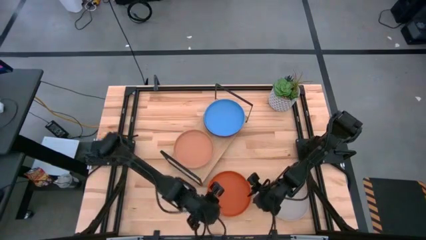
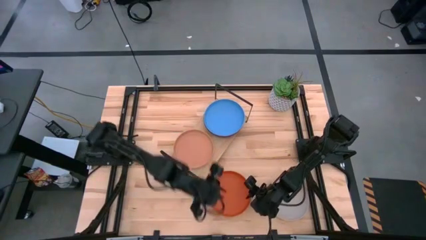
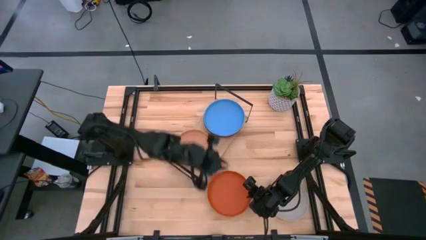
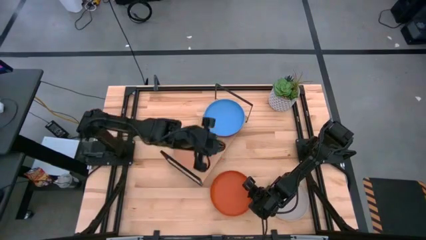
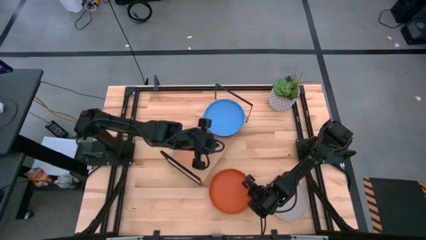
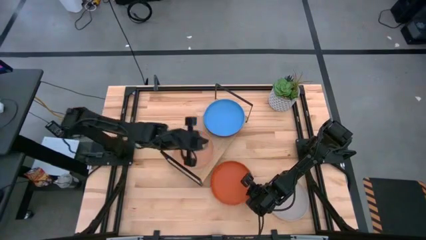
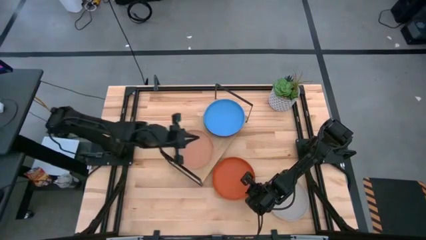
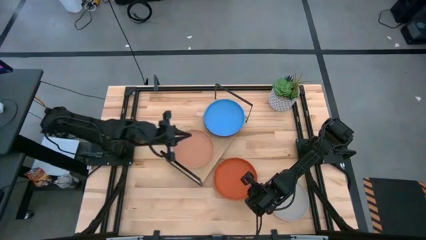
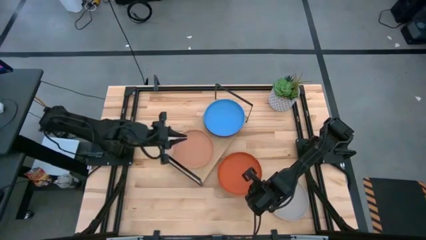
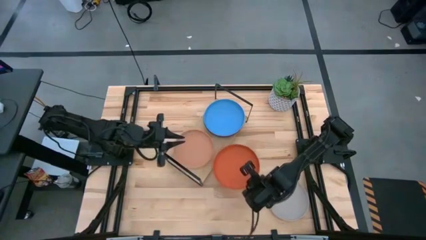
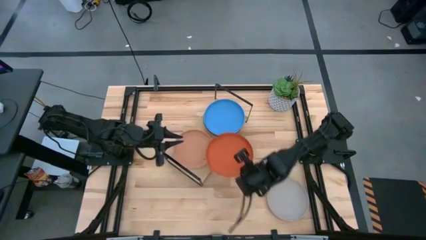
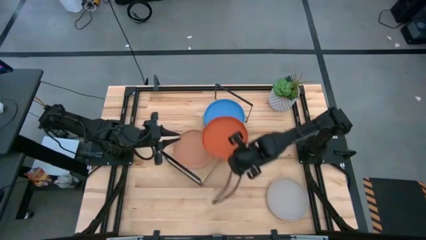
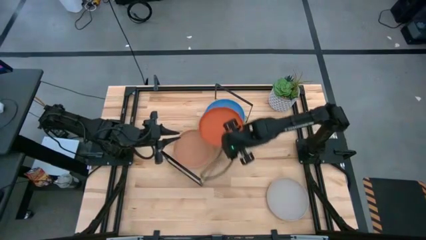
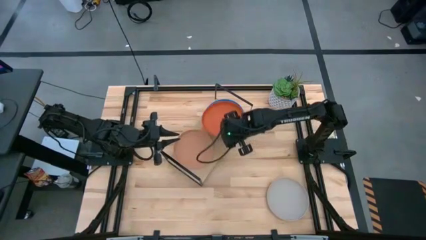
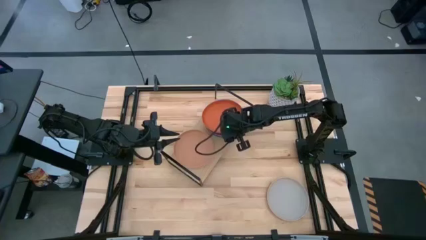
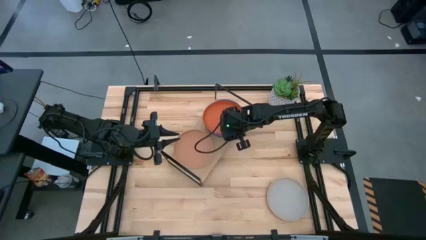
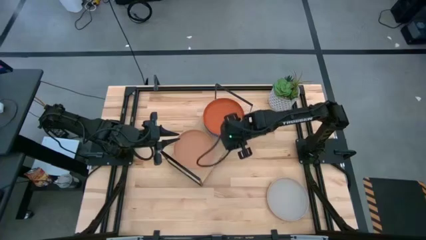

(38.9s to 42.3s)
Task: Place and stack plates onto a shelf
Stack the orange plate on top of the blue plate on the shelf

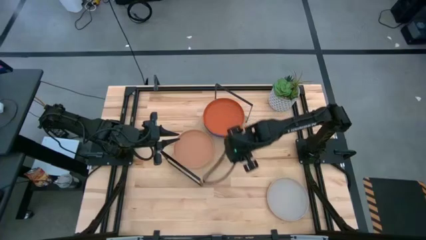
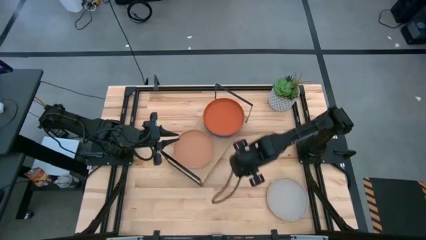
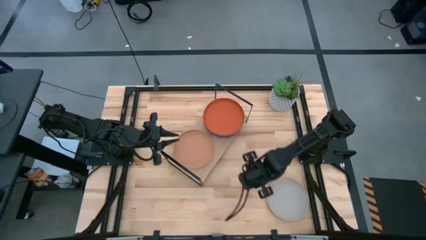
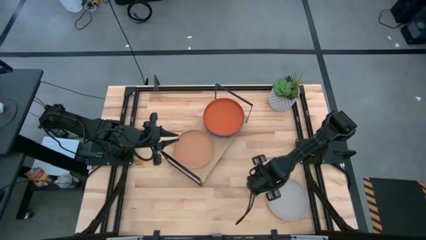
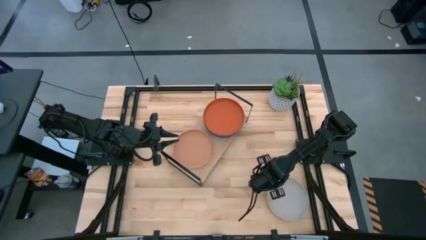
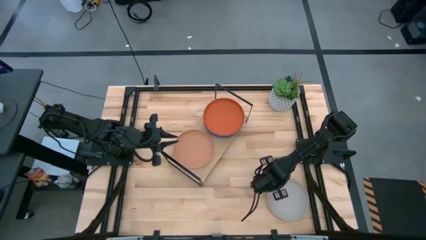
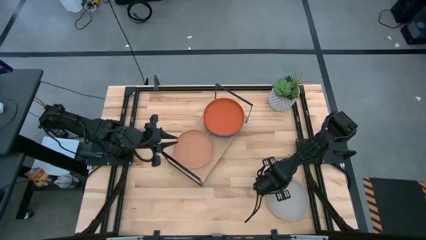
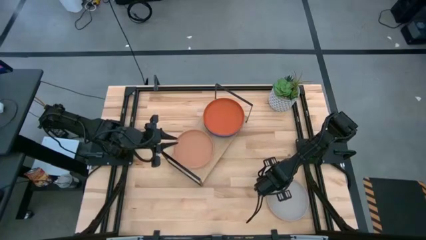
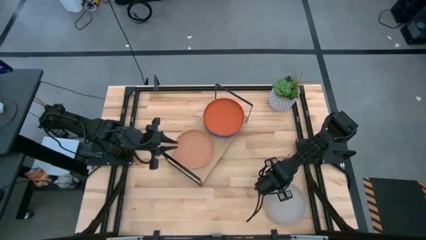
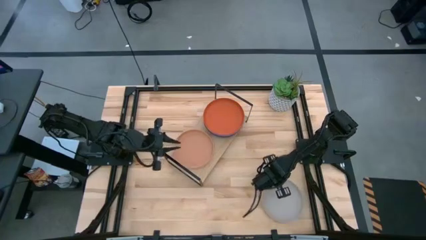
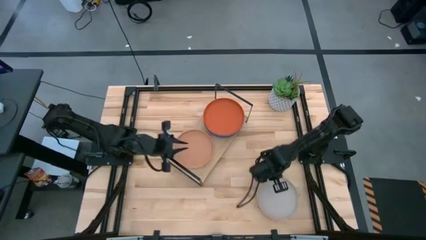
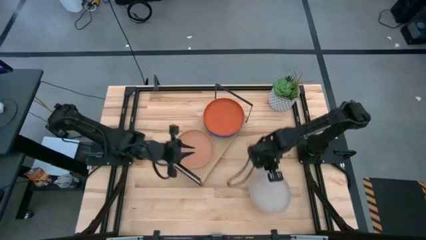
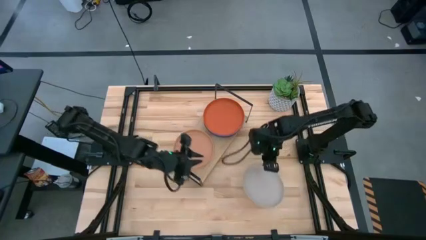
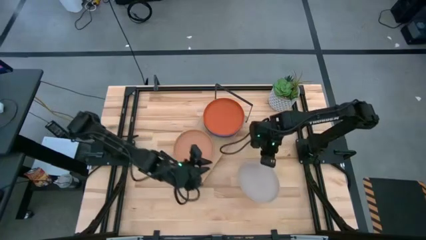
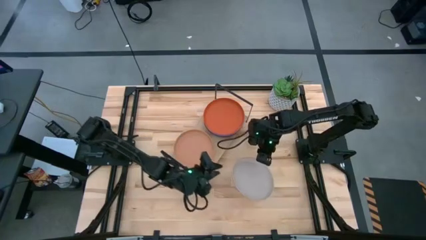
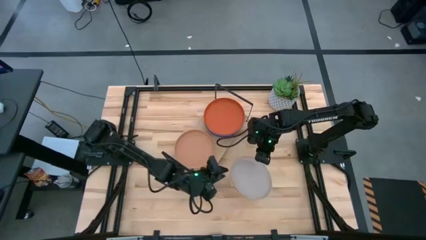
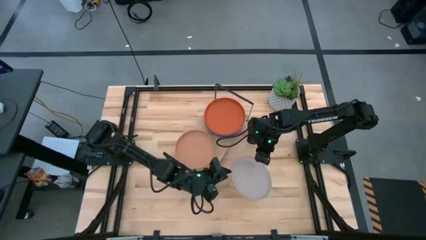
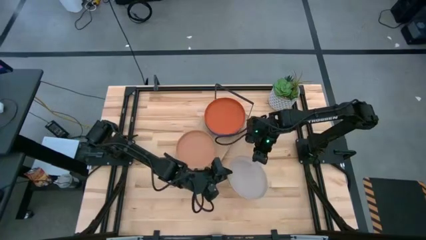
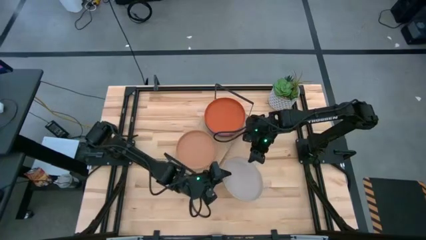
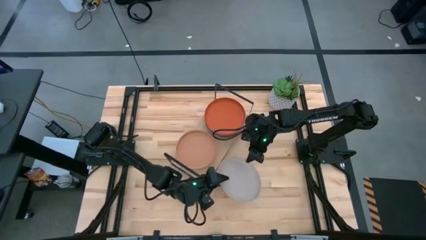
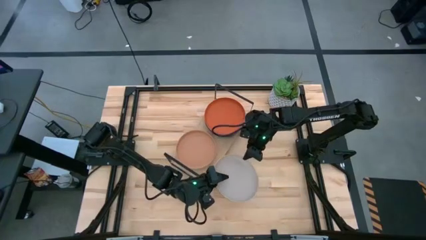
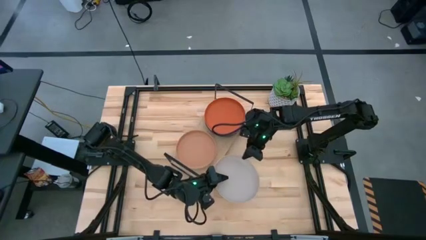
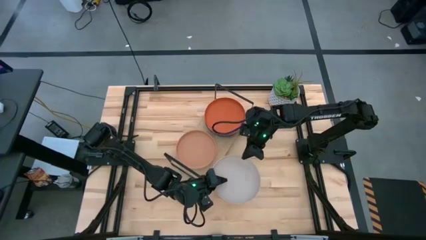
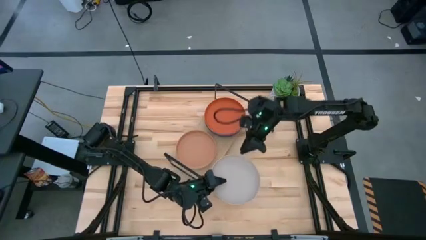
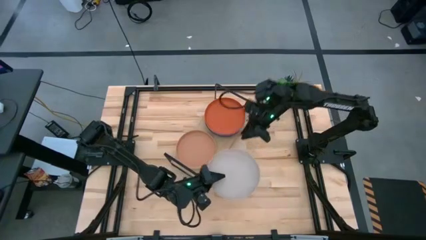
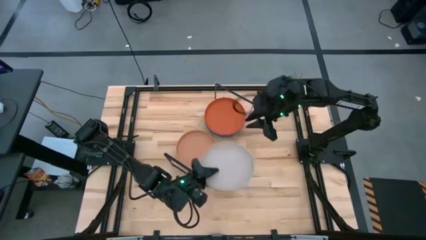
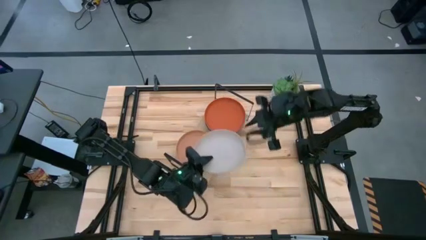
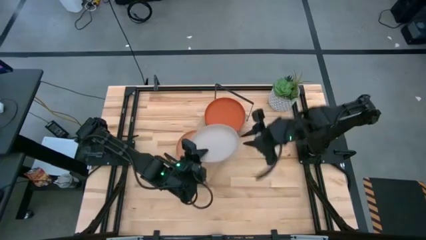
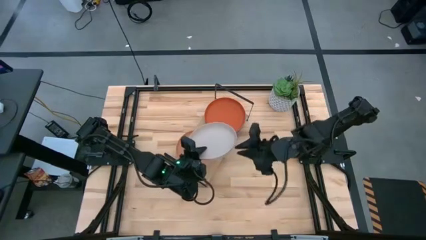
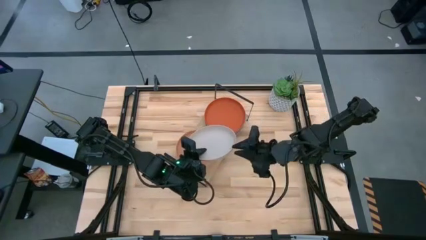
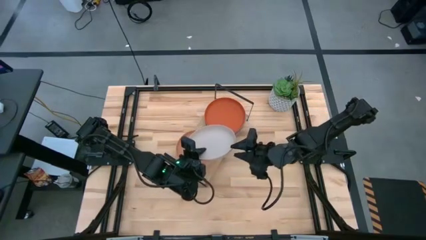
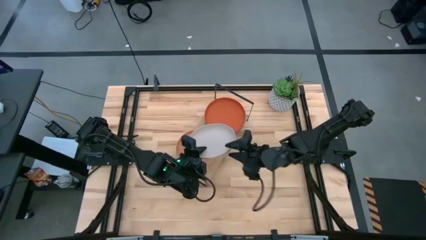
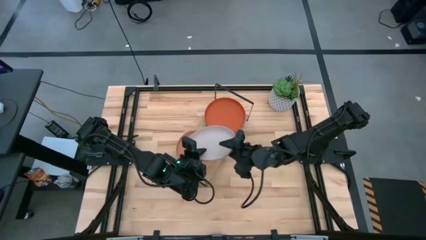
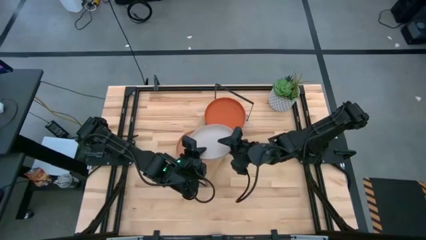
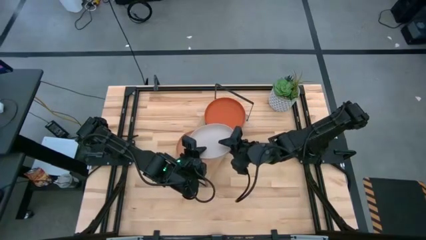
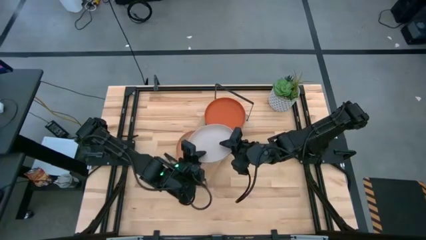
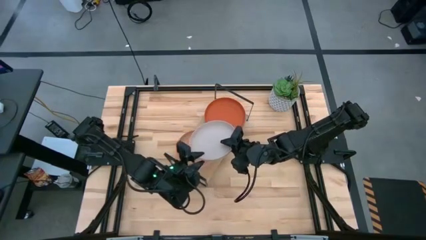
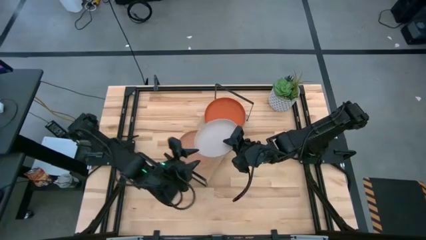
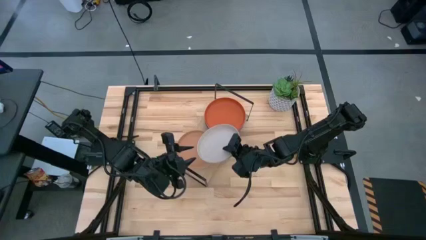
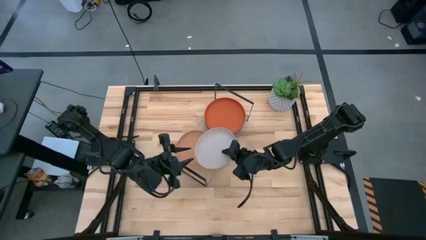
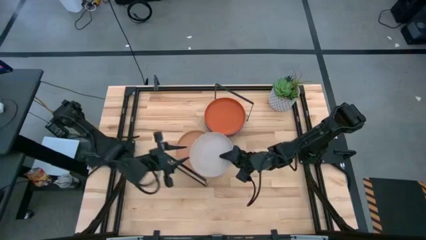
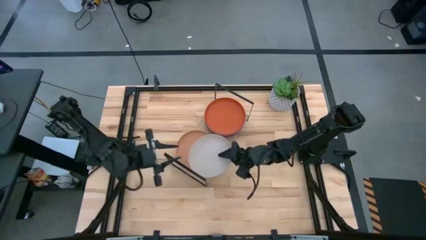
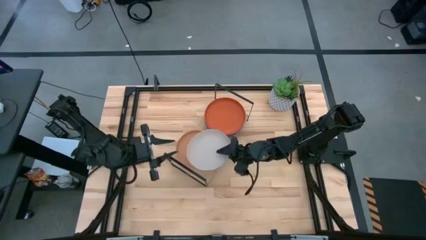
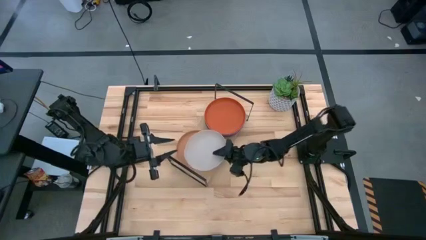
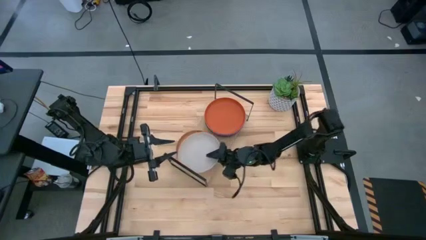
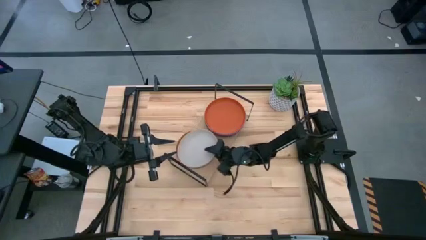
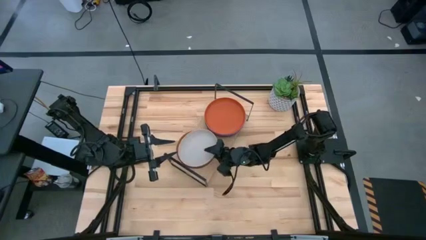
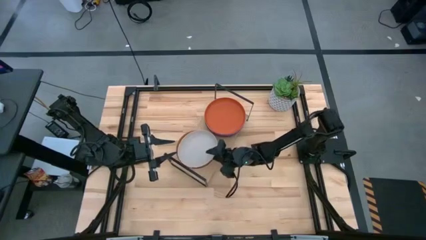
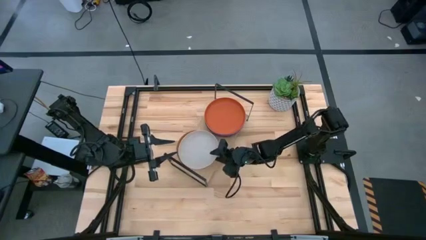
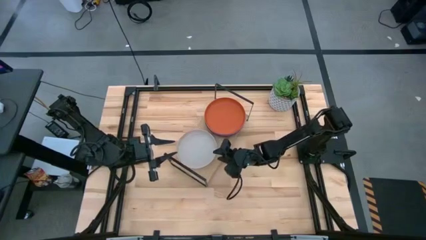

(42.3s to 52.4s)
Stack the light gray plate on top of he brown plate on the shelf

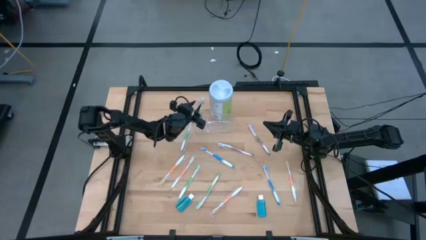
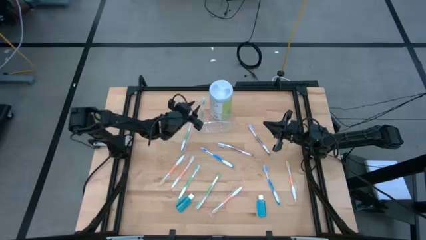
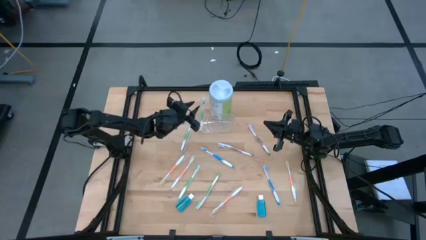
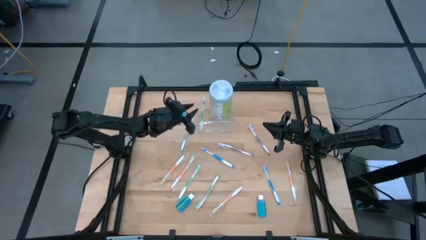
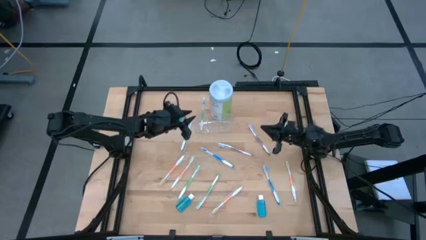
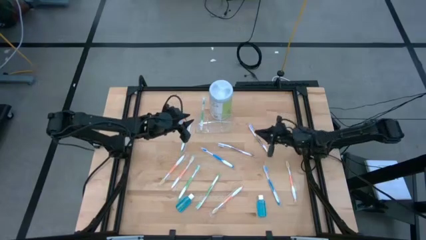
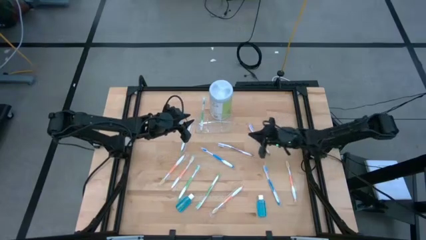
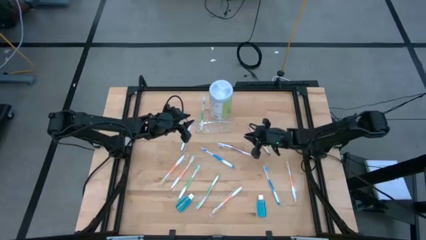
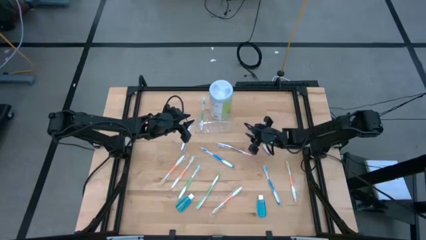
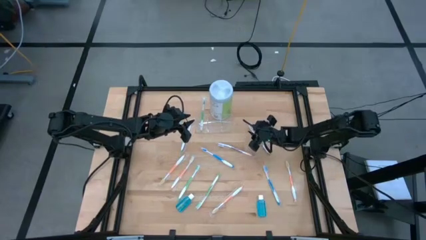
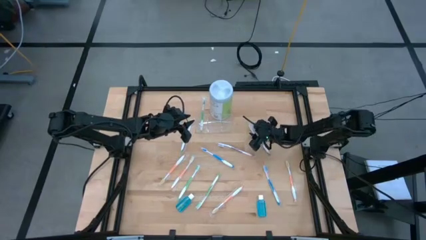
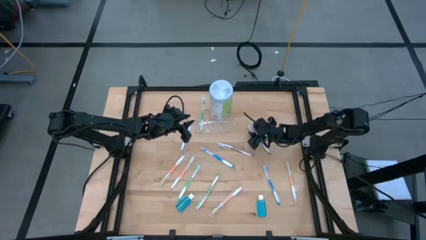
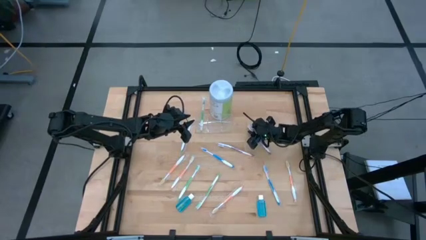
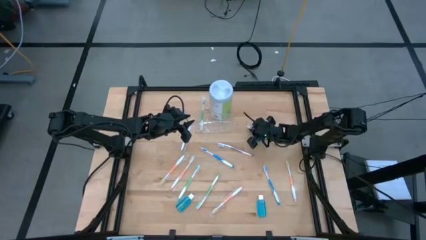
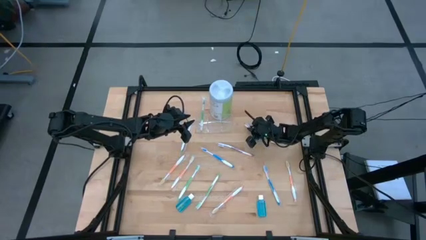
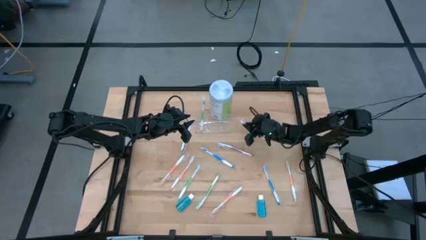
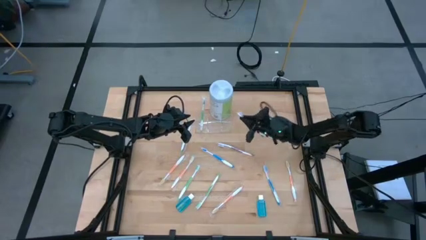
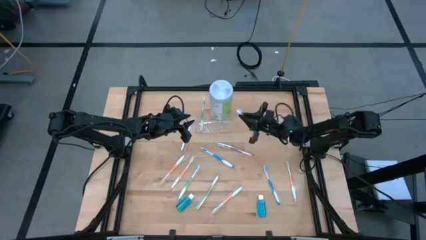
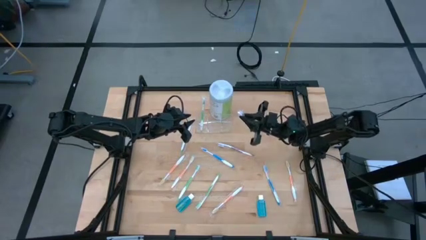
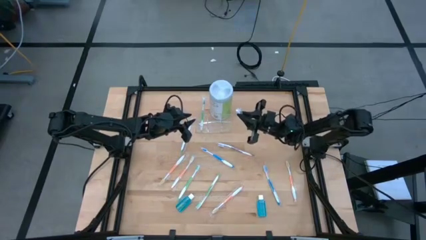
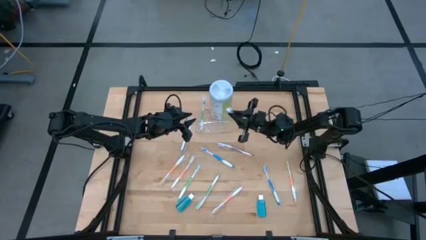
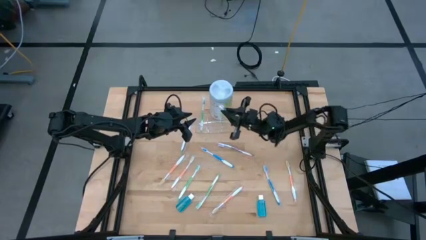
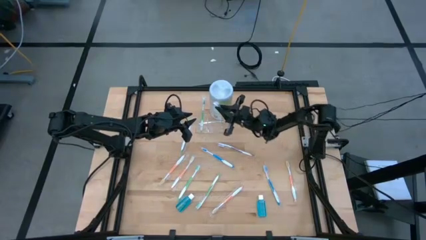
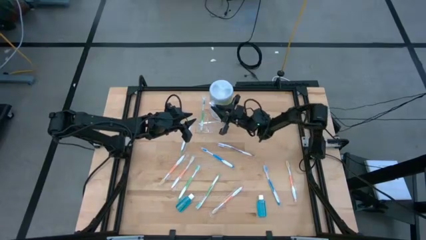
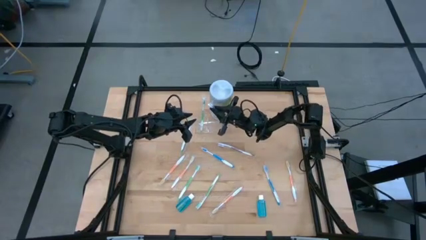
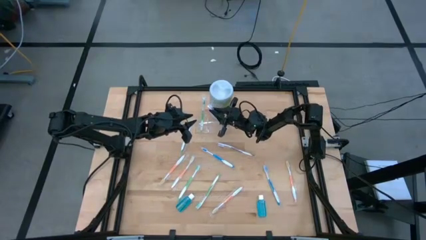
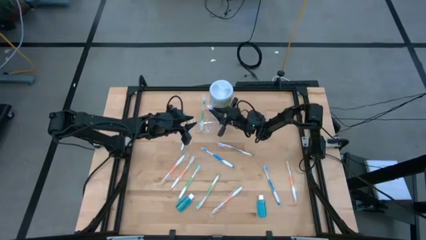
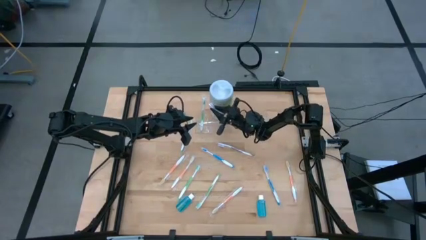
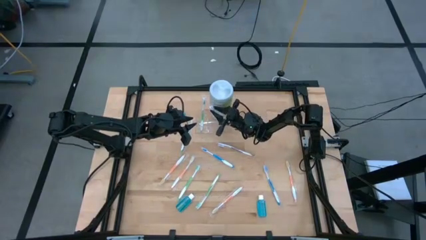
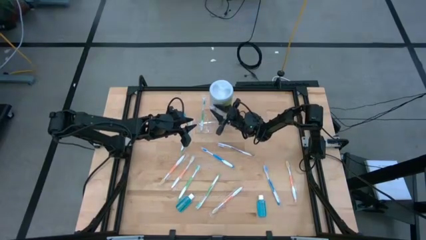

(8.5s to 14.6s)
Task: Pick & Place toothbrushing station
Put the violet toothbrush into the transparent organizer
